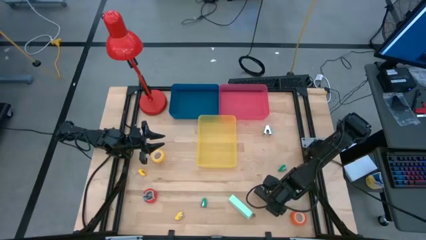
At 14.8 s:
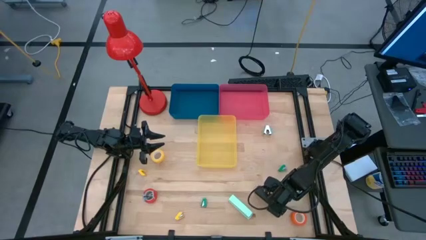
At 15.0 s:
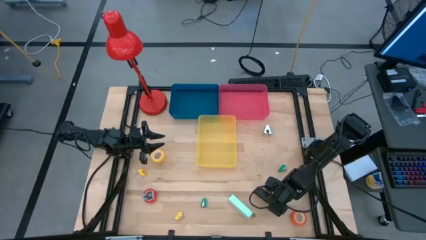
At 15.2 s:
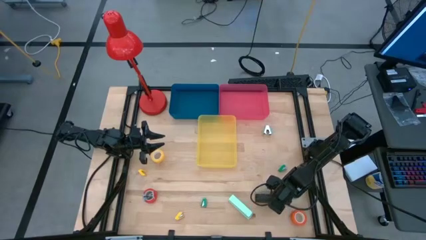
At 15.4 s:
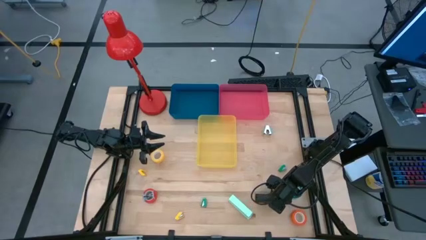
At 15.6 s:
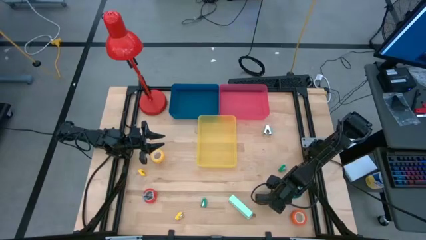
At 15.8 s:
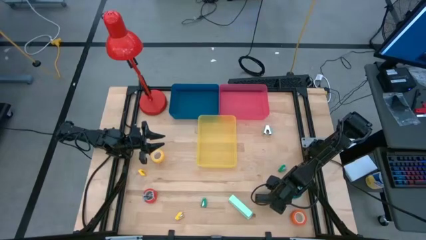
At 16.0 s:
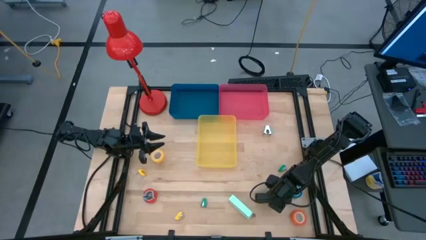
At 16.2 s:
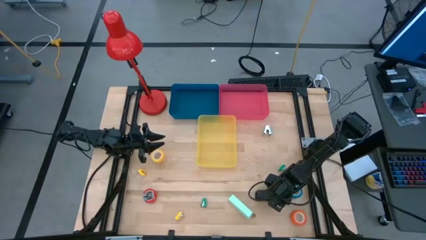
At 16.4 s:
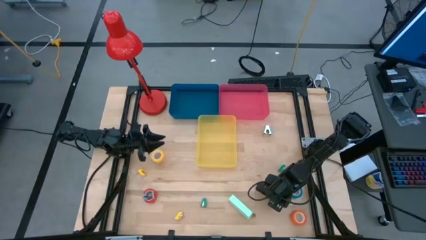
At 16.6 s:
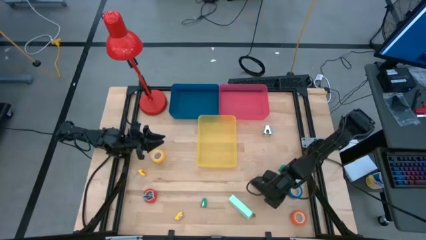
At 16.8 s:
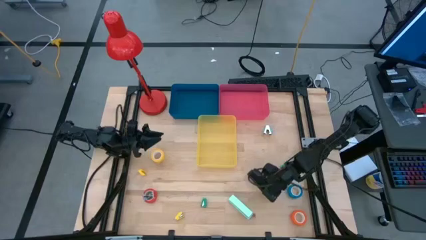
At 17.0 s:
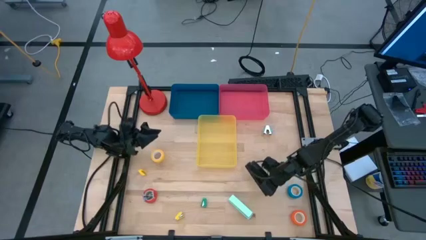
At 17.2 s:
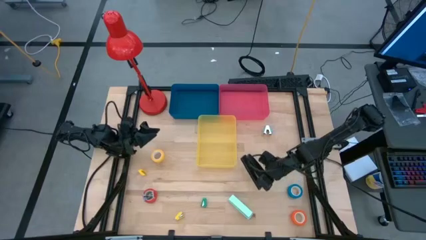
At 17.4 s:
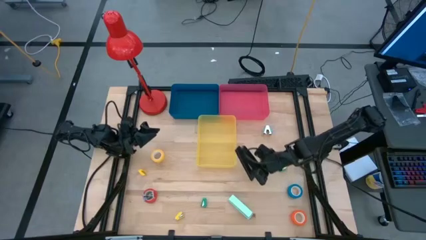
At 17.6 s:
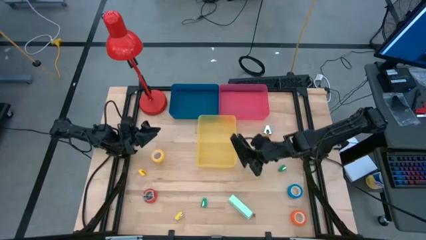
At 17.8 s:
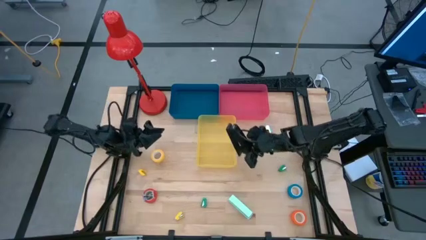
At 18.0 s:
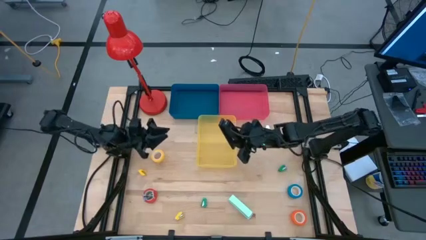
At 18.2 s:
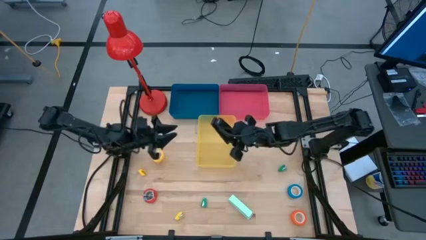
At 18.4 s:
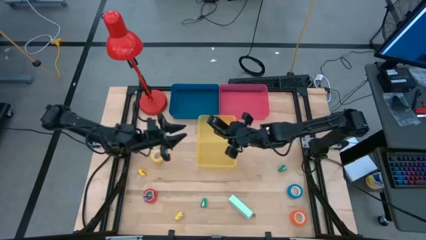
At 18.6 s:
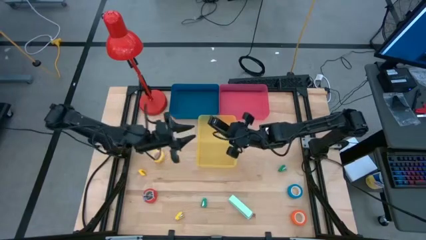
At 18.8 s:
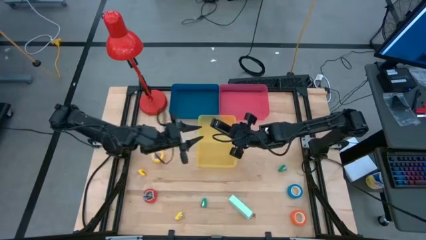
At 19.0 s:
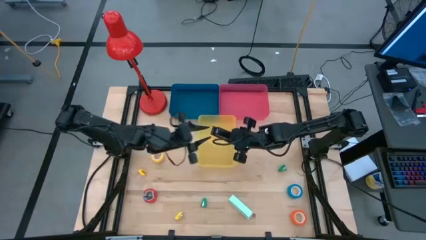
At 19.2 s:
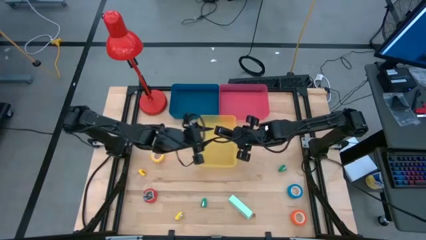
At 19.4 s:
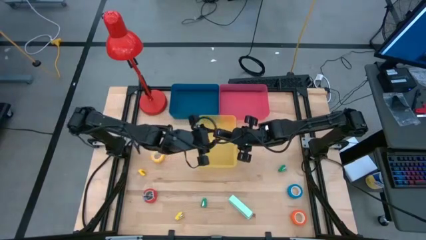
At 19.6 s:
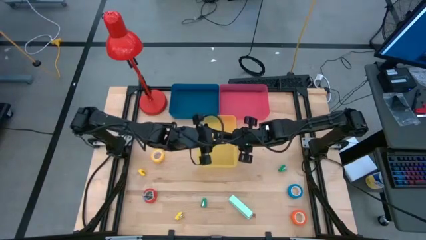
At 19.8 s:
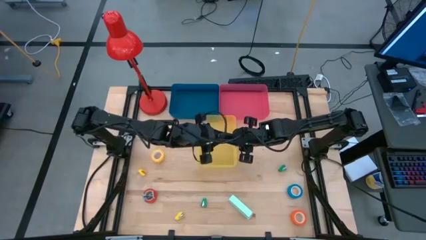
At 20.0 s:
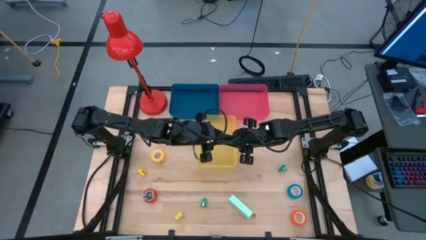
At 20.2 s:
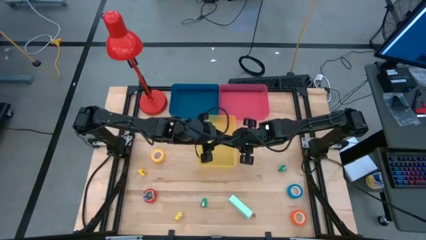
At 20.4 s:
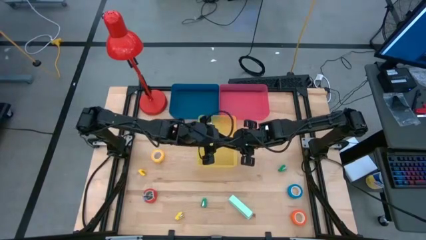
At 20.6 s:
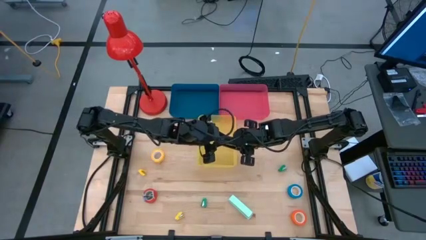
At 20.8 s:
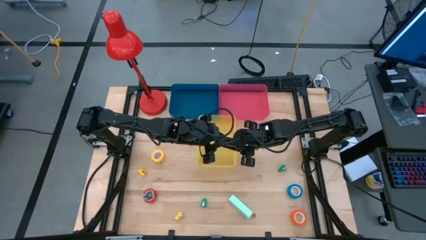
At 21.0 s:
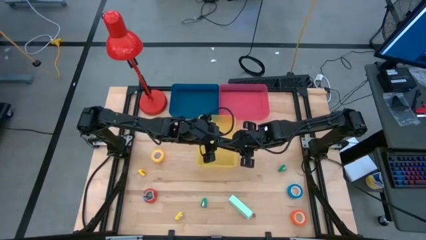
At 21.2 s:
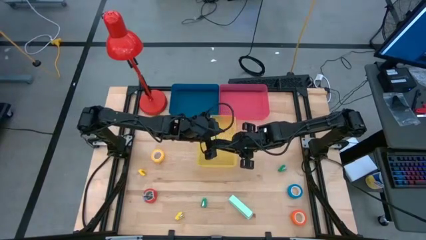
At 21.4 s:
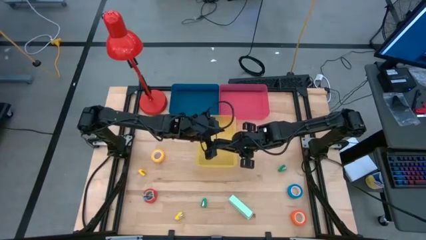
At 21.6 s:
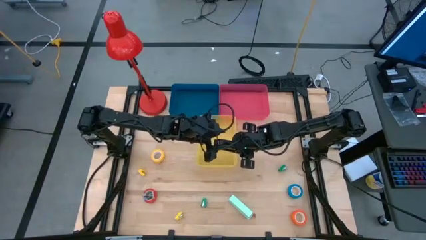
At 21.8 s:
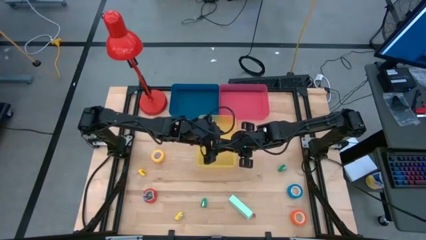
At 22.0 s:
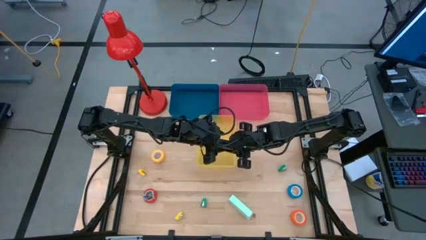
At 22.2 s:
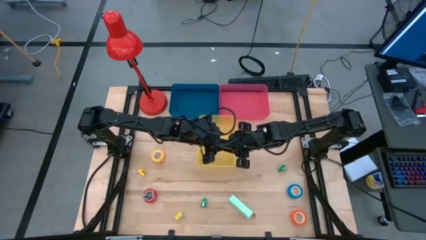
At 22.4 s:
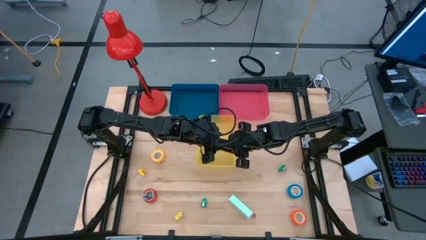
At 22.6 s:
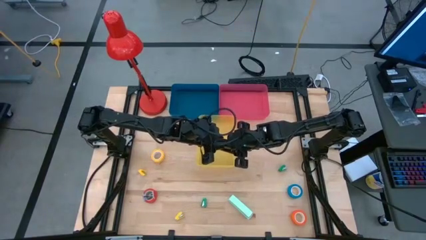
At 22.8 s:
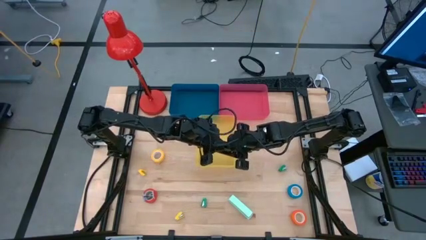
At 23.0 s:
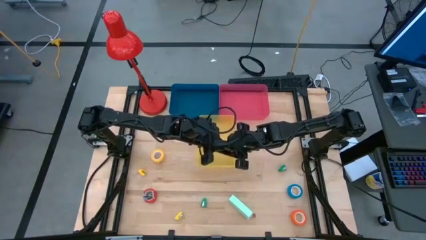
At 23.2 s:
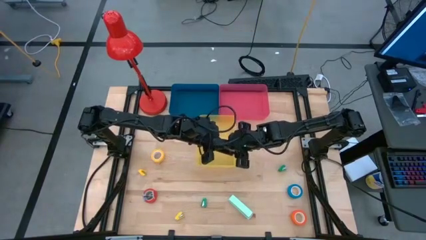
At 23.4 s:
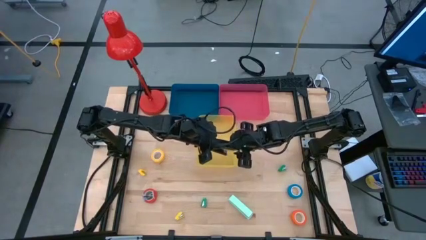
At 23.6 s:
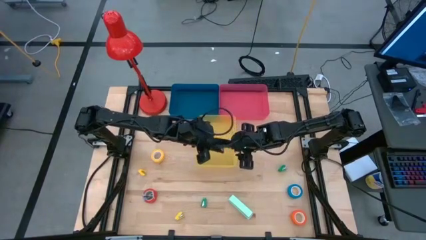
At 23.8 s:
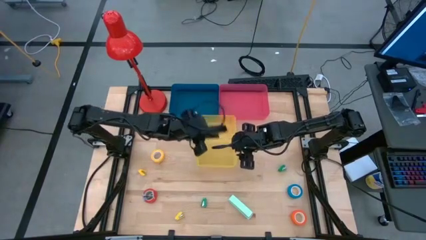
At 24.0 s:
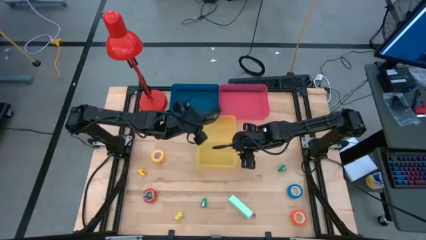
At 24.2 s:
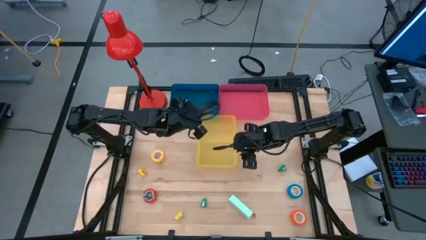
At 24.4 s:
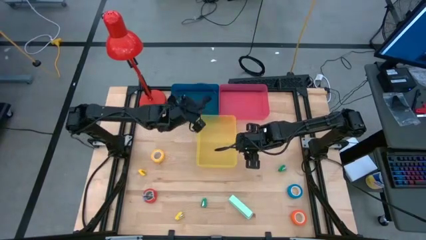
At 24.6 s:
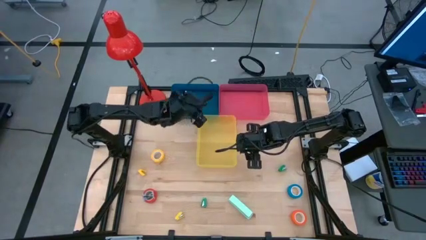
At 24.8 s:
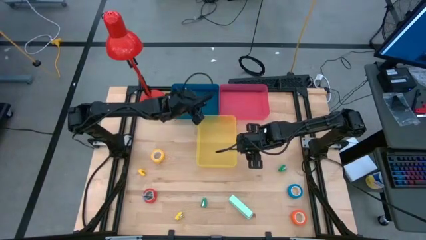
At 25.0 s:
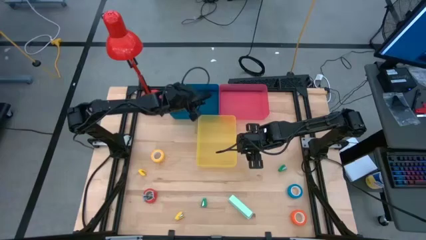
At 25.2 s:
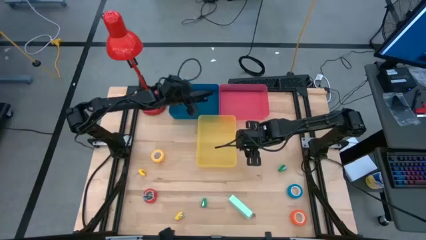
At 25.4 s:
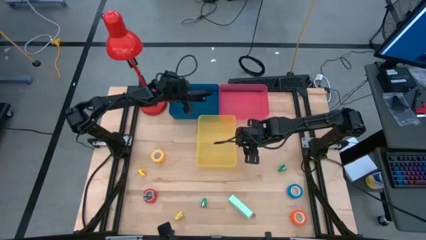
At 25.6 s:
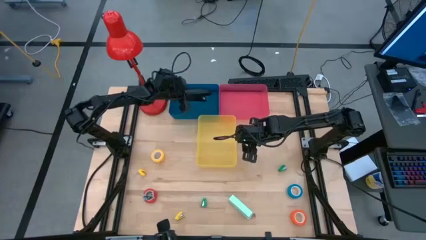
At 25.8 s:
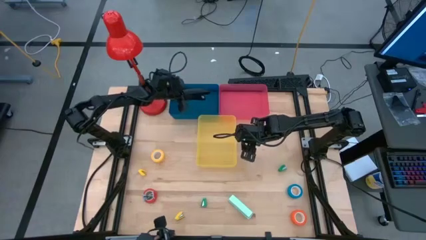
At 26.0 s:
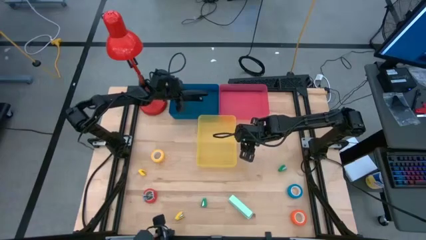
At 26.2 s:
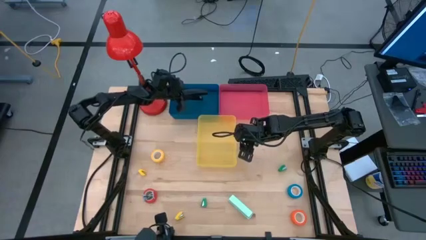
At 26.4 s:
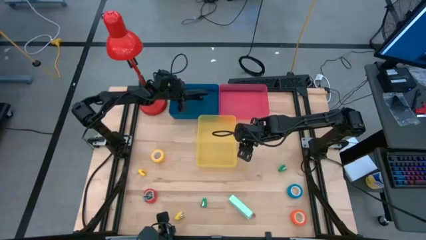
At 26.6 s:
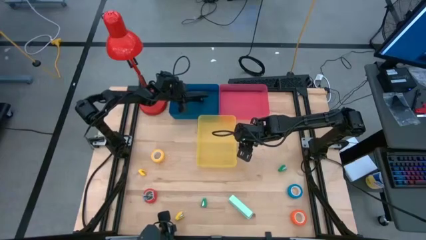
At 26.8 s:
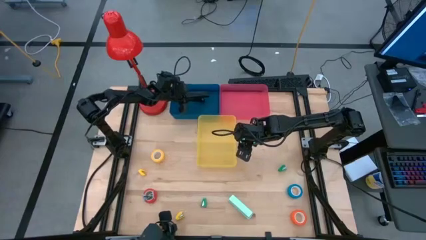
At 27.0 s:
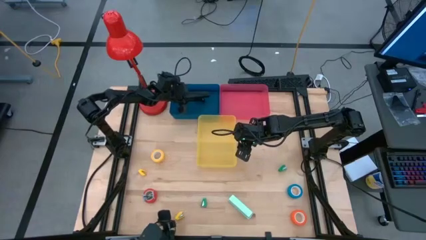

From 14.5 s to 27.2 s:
Task: Pick and place Stapler, Stapler remover, tape
Put the black stapler into the blue bin
